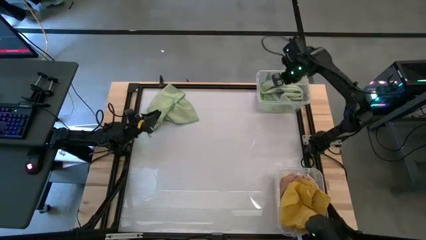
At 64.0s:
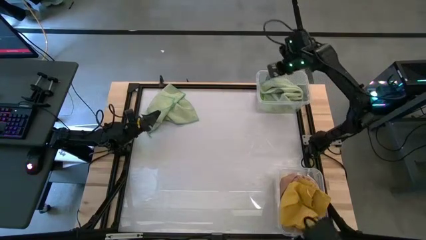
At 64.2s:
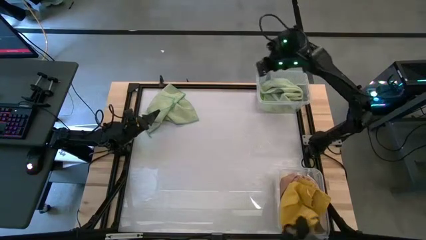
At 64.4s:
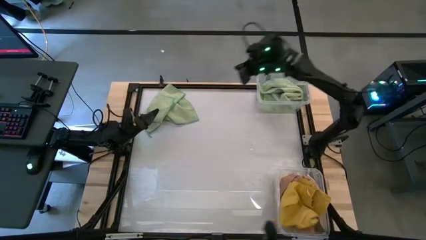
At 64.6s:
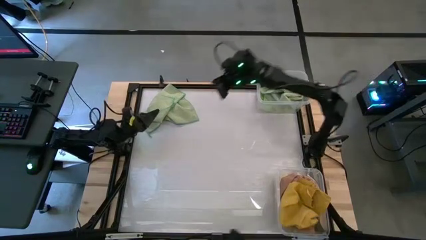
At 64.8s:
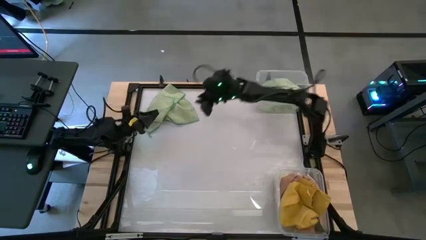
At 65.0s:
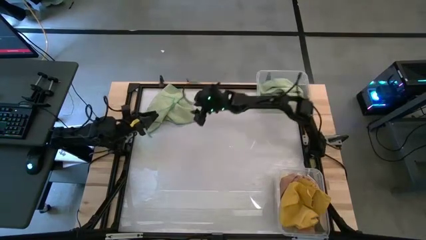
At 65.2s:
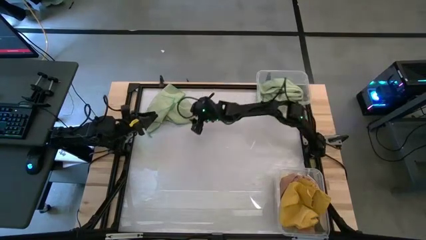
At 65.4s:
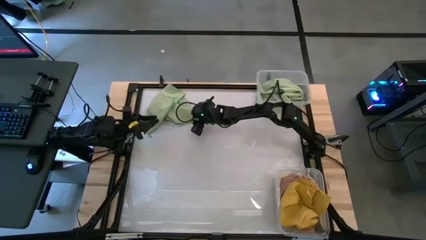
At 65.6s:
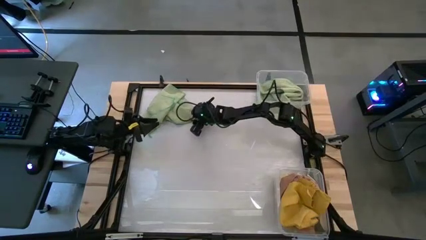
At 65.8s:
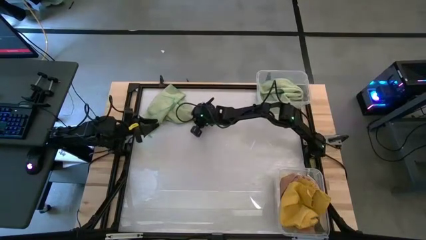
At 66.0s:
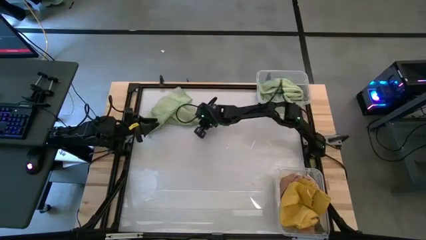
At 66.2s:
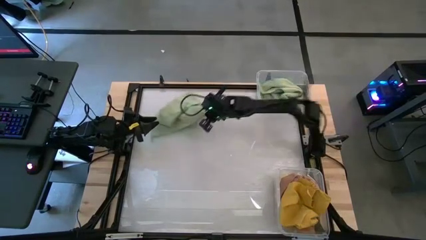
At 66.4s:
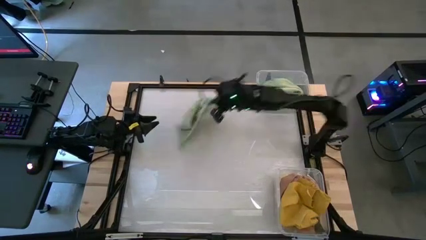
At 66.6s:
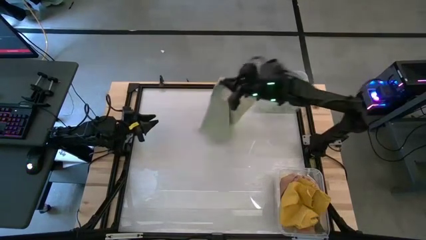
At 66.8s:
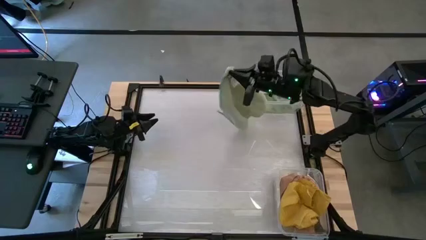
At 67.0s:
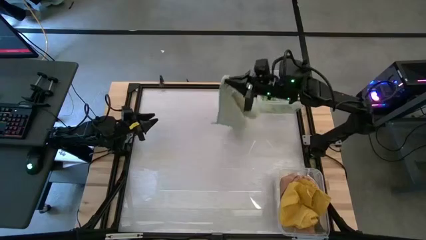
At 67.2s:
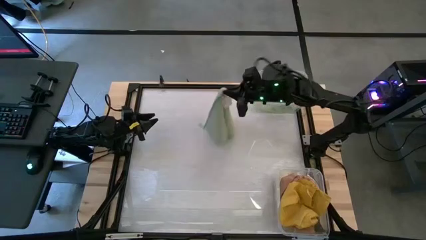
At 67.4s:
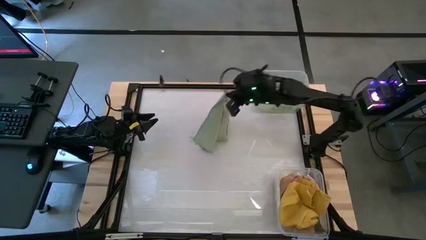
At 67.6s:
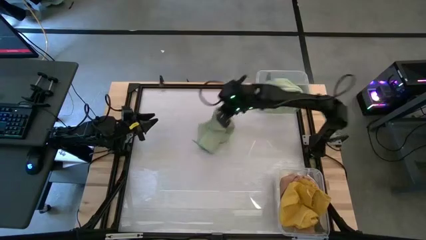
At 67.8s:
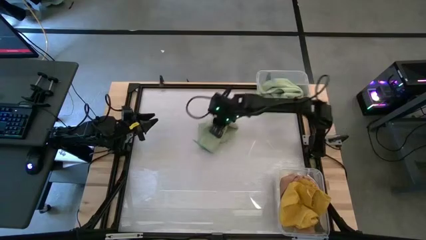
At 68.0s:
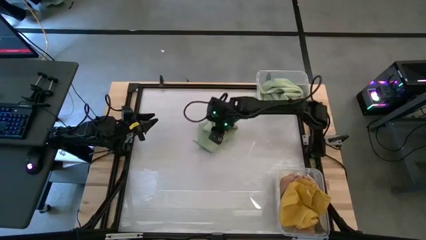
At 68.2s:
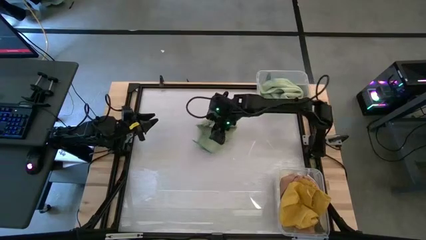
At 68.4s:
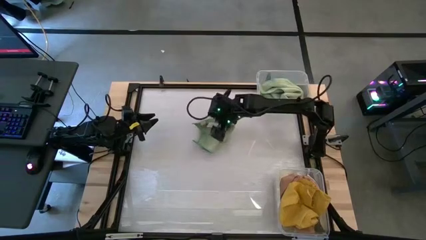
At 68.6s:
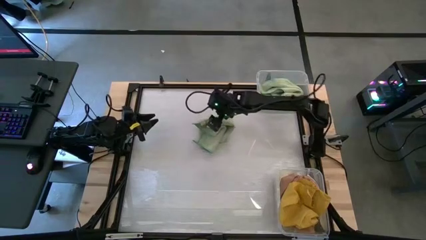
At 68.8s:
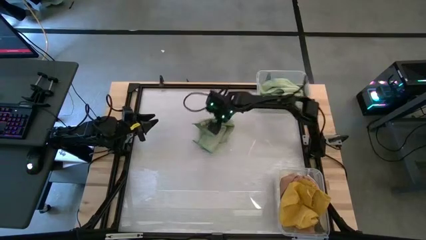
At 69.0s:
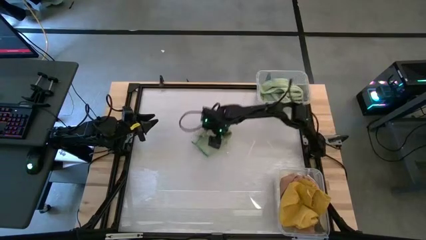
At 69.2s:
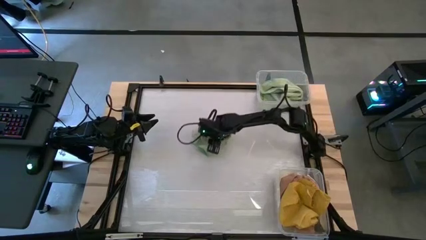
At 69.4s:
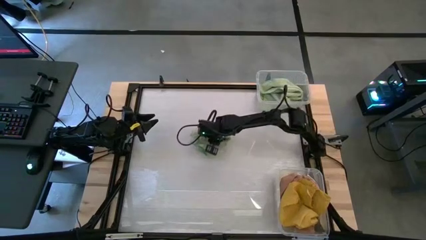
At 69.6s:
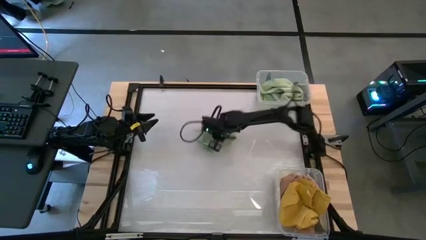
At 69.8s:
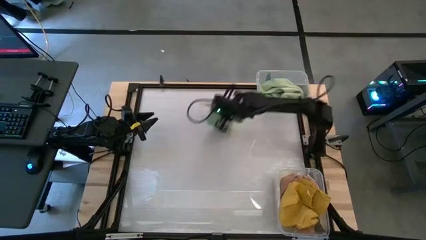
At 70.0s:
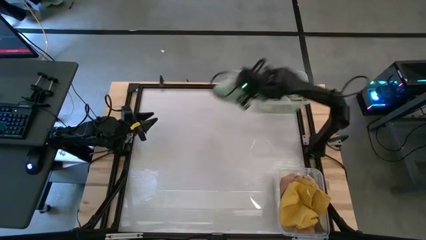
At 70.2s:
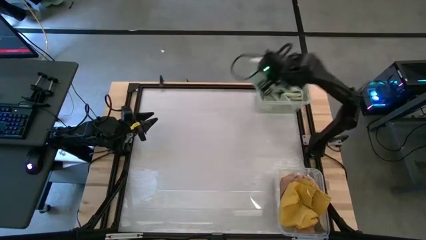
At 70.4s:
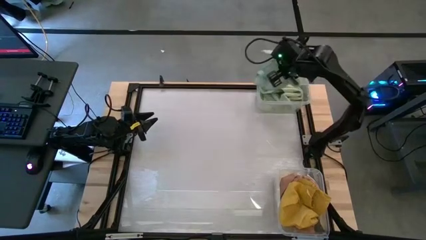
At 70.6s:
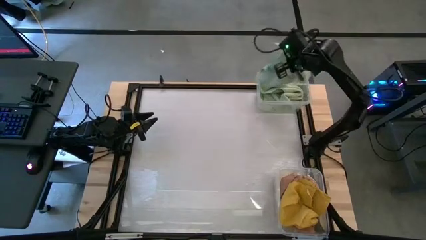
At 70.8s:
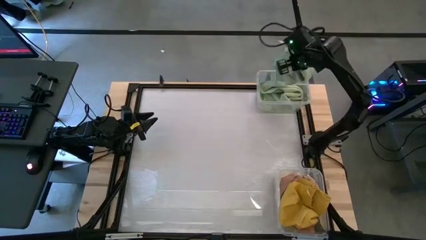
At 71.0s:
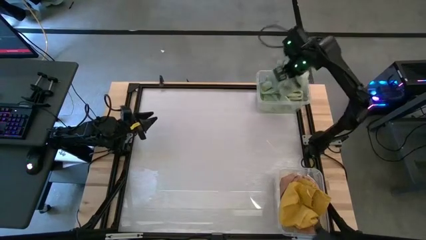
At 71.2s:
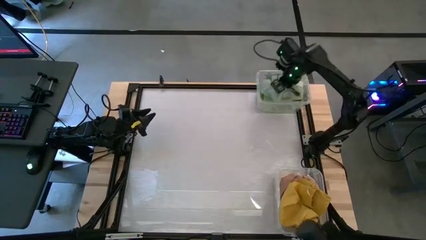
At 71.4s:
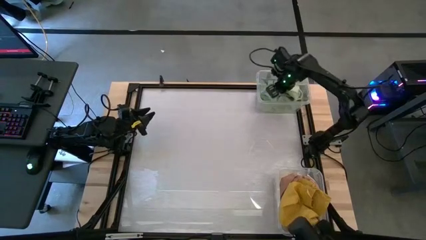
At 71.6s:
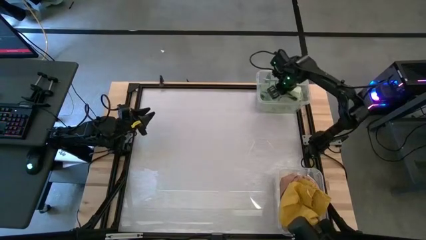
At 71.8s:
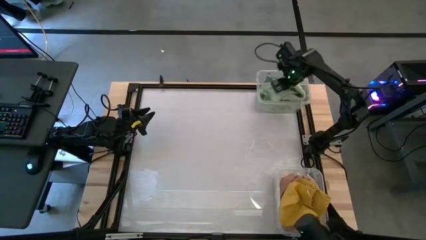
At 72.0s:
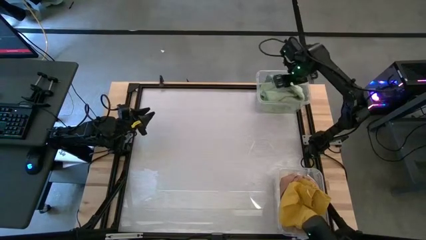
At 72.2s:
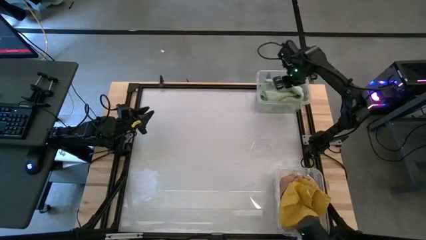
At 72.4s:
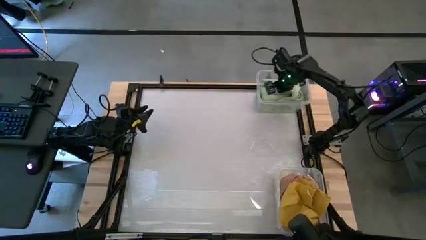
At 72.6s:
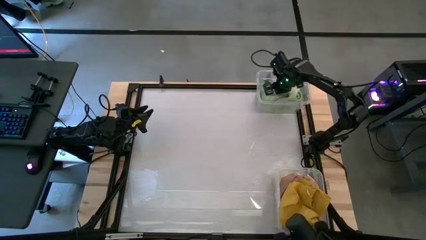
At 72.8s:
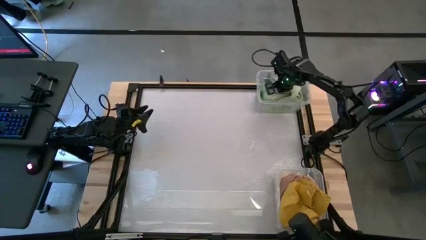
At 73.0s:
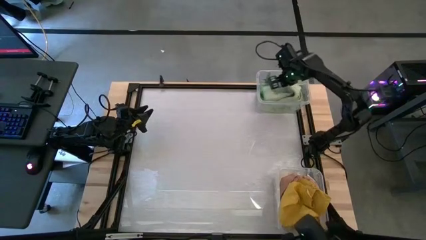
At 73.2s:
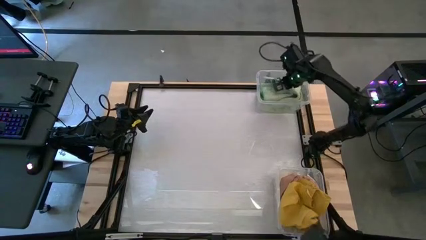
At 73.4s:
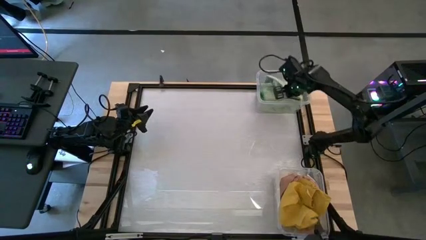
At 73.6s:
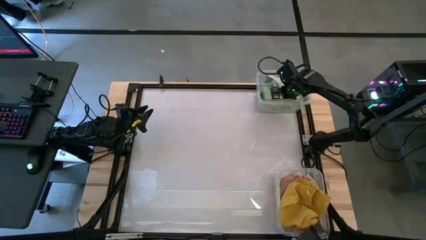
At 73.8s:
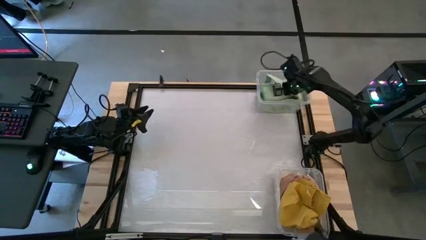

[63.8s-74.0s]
Task: Sort towels by color in basket
Put the light green towel in the top transparent bin

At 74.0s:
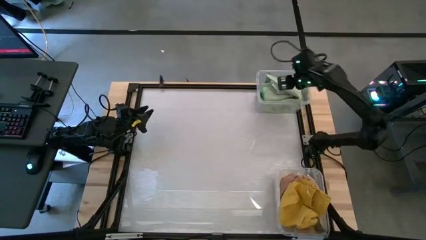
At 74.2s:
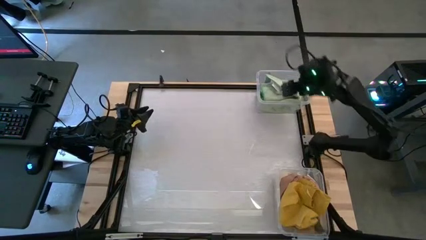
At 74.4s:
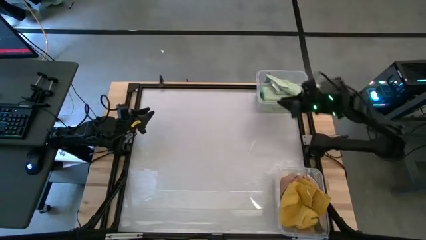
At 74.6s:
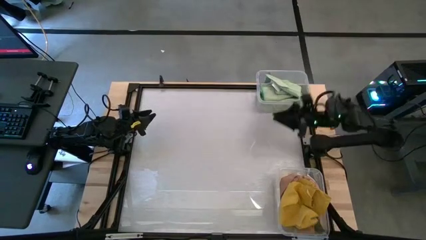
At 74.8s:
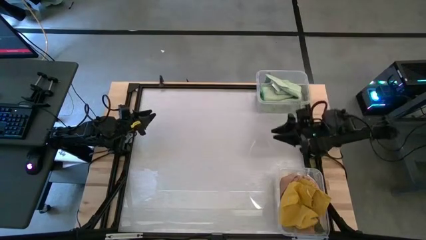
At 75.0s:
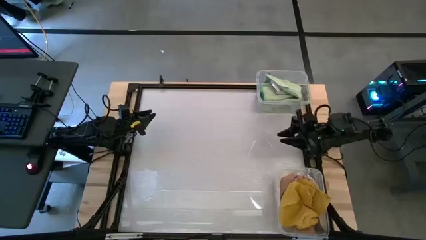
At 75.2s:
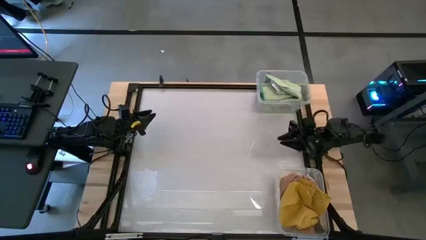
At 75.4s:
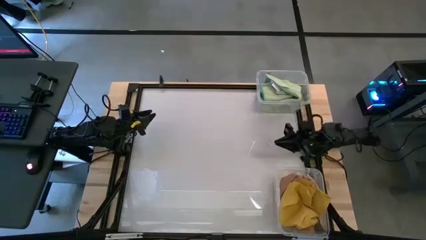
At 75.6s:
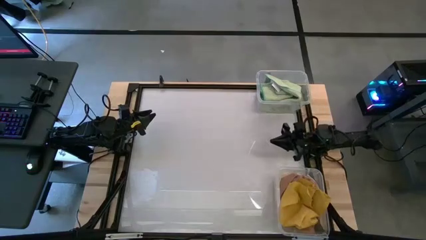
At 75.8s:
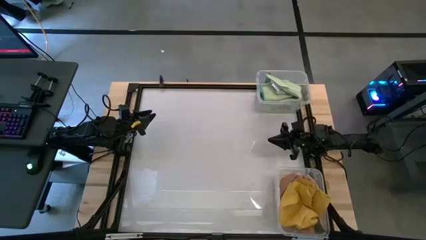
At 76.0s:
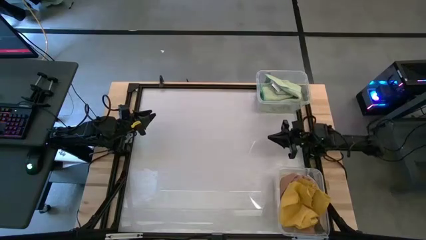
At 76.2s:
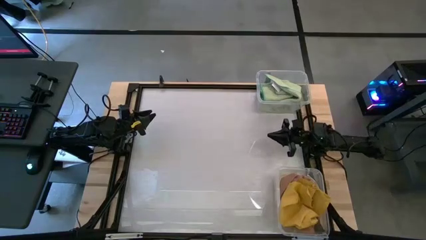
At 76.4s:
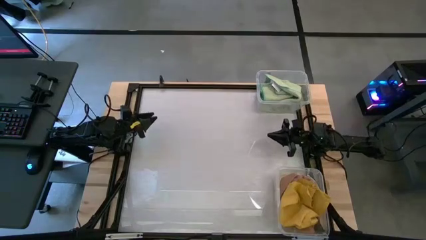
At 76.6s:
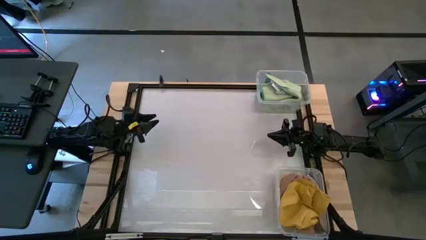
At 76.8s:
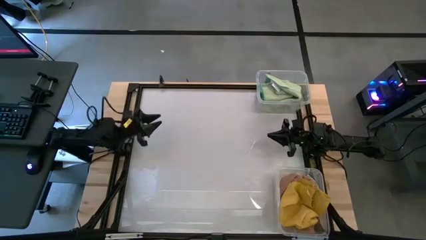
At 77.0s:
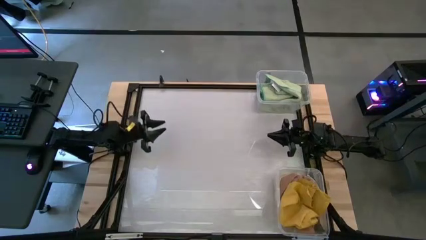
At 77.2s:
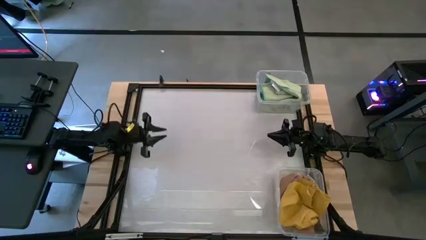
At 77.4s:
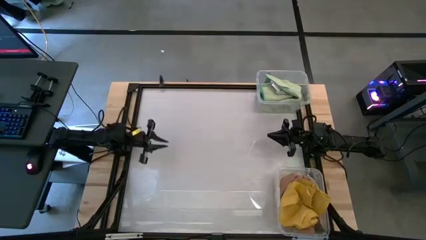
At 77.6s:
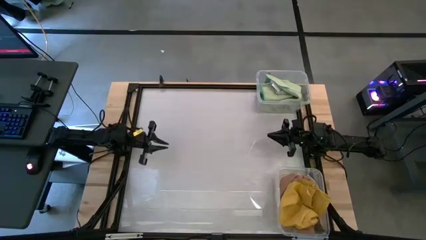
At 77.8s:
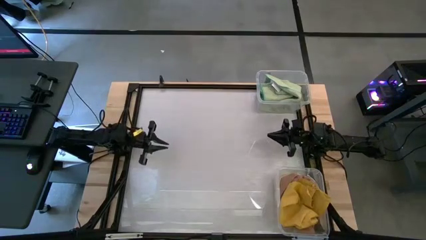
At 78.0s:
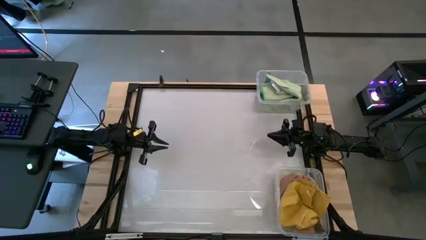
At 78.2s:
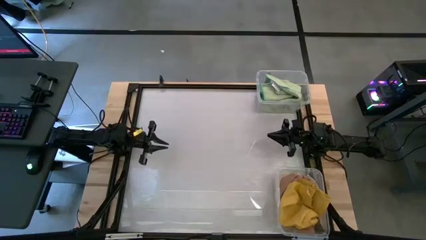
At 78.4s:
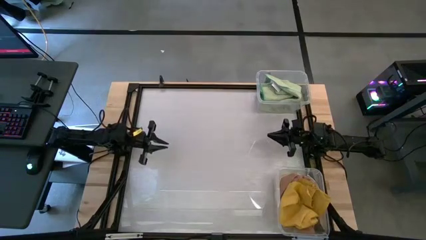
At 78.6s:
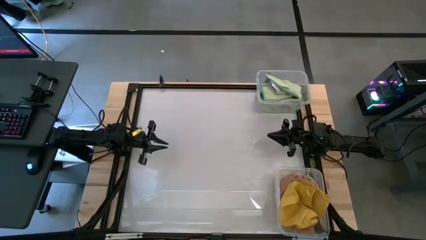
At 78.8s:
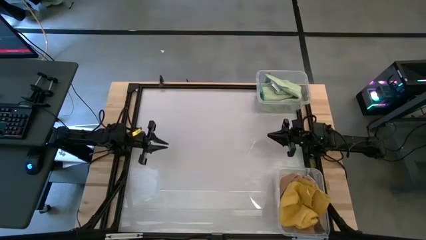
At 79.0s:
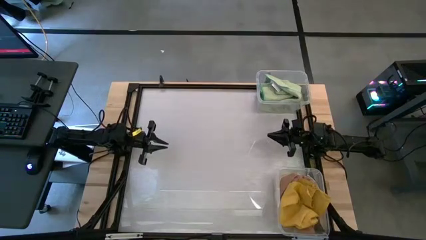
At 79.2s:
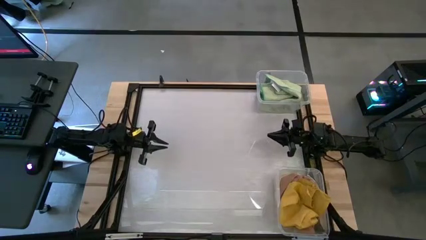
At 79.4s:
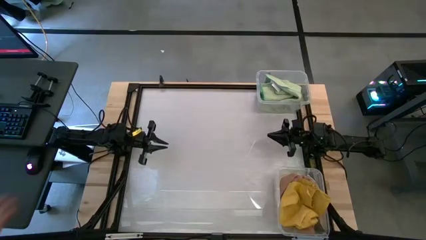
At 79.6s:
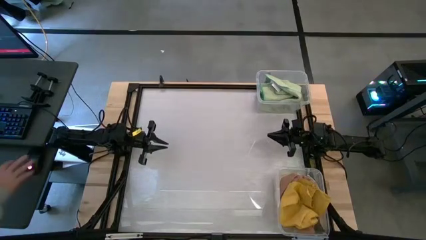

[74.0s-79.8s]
Return to Home Position
